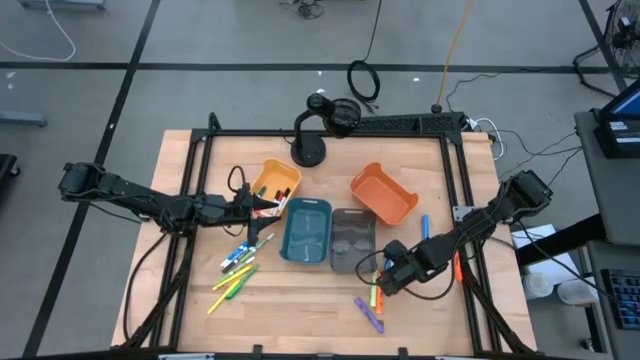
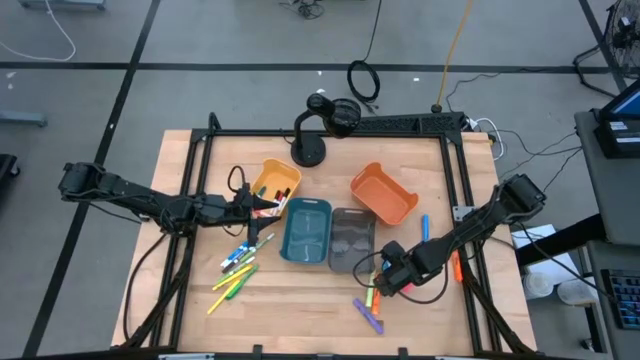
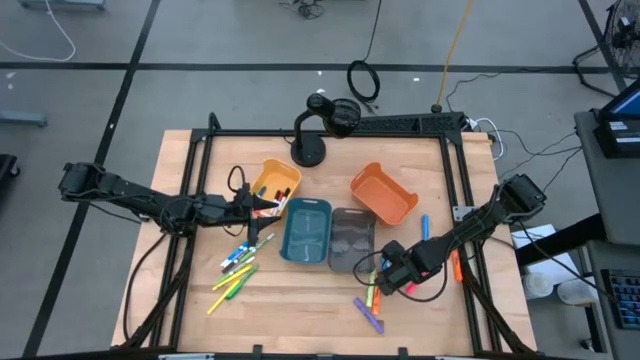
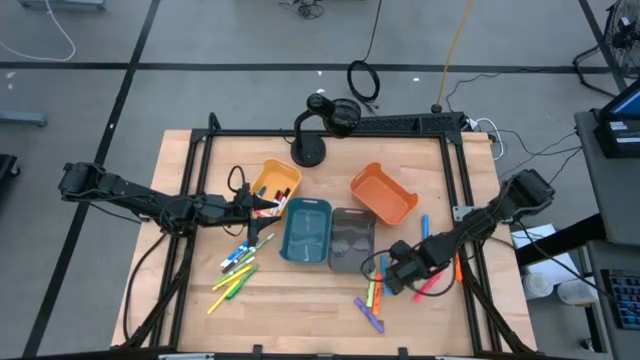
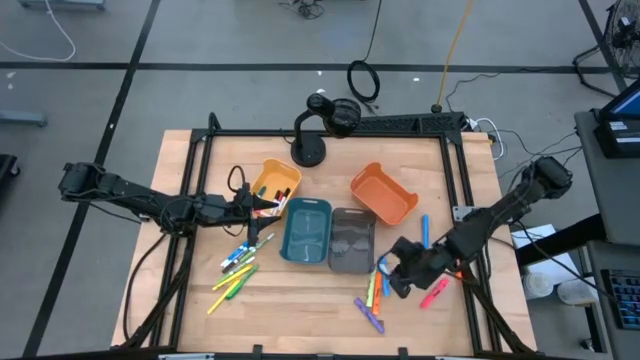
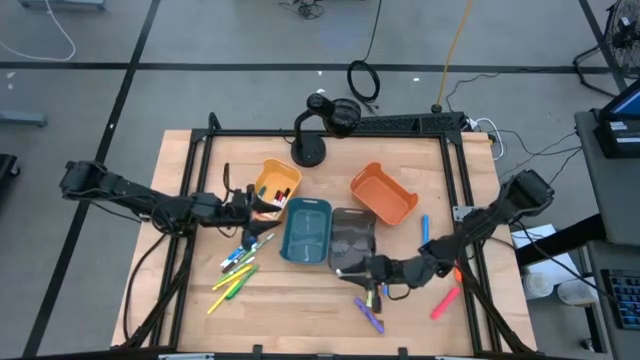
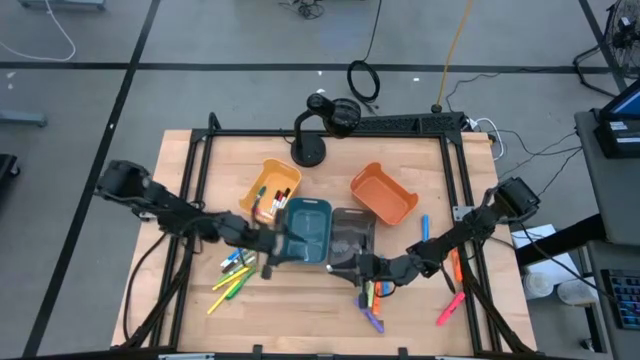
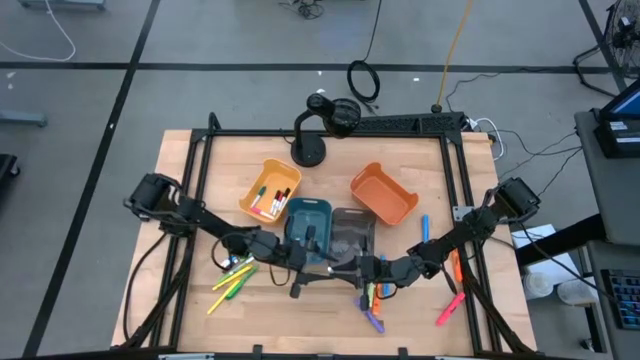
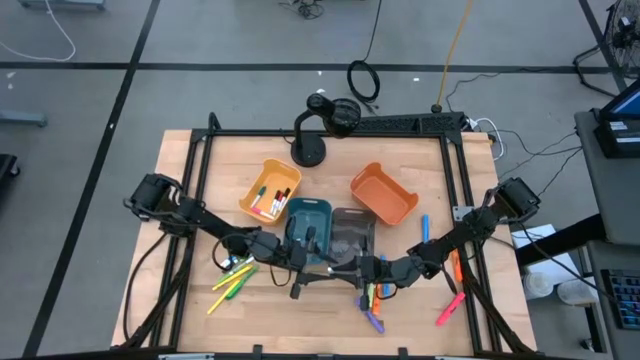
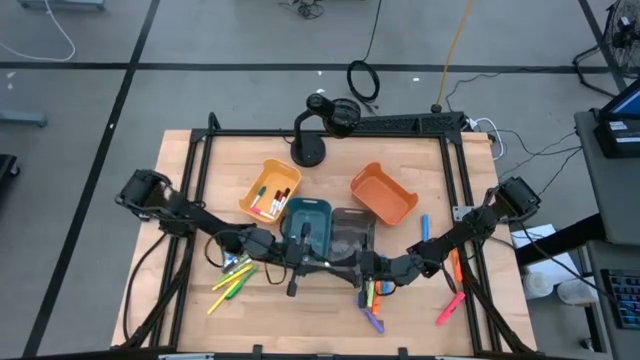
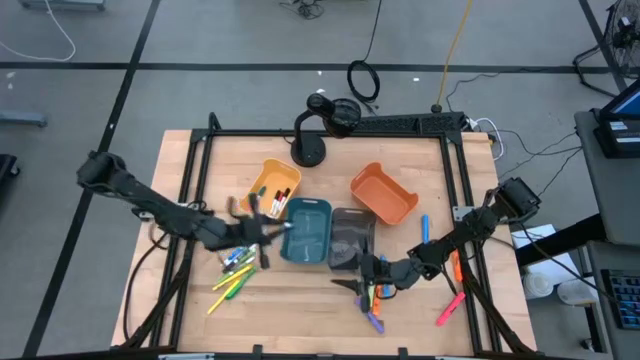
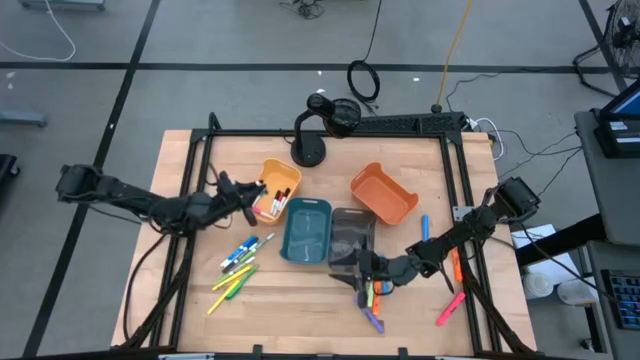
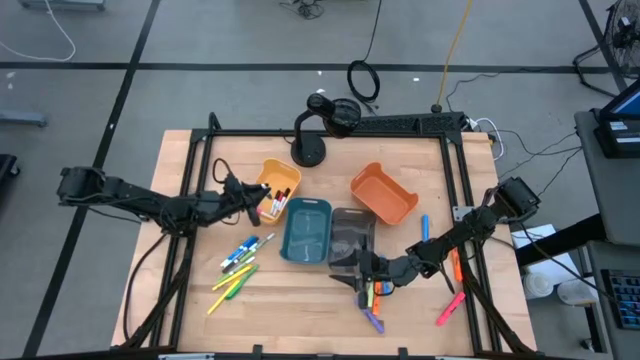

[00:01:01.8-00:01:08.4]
Task: Pick & Place Markers
Put the white and green highlighter into the yellow bin

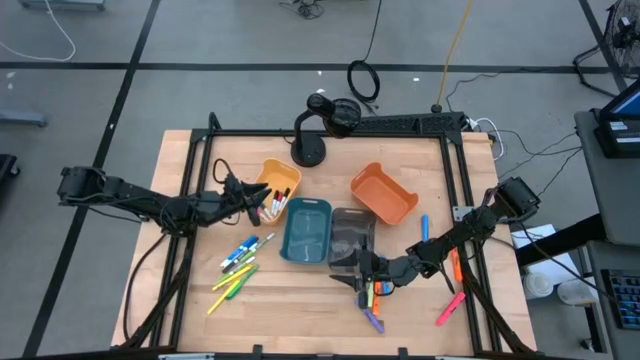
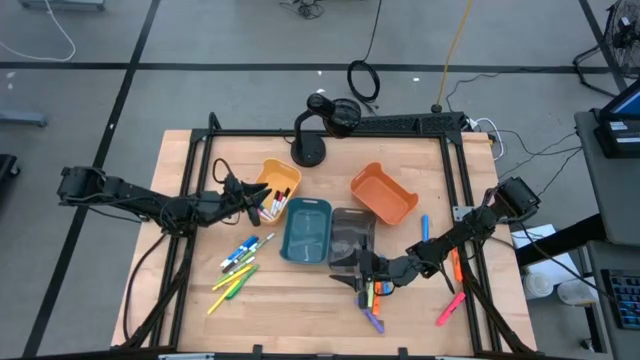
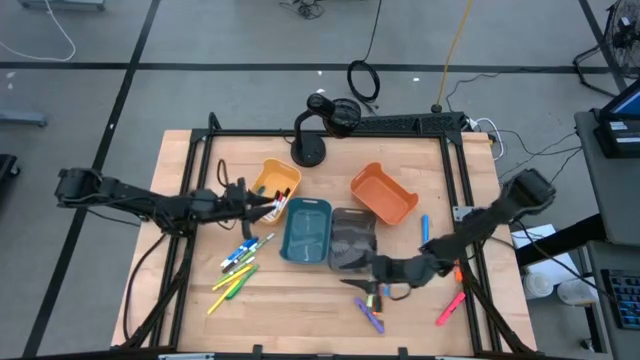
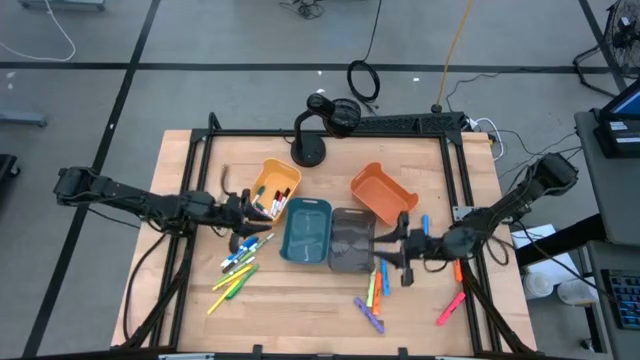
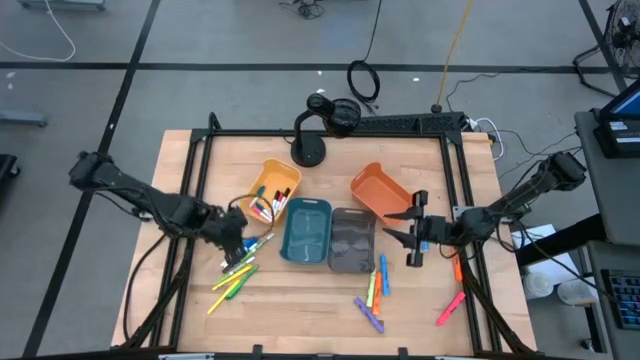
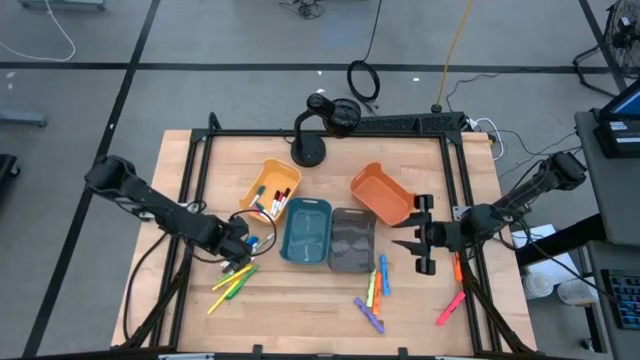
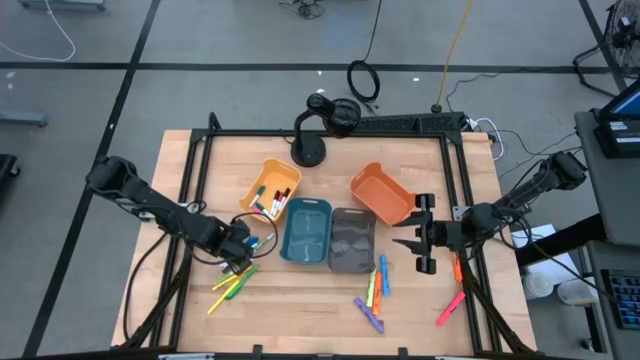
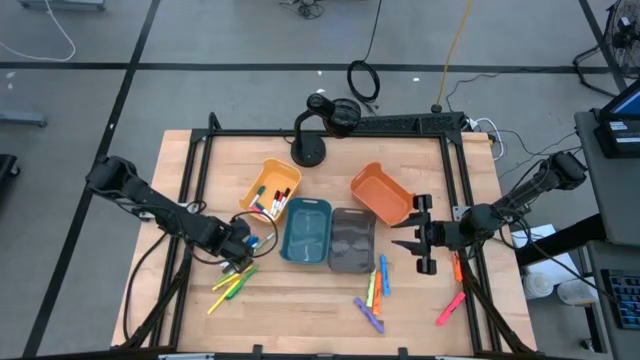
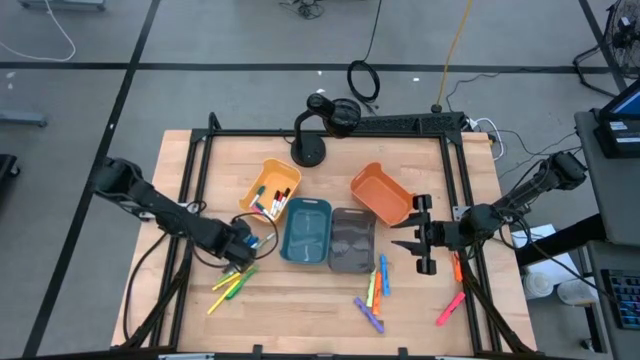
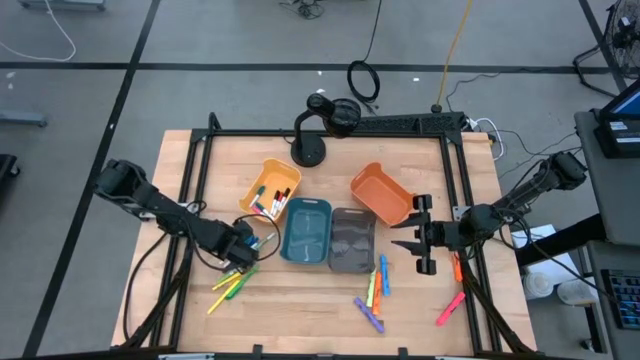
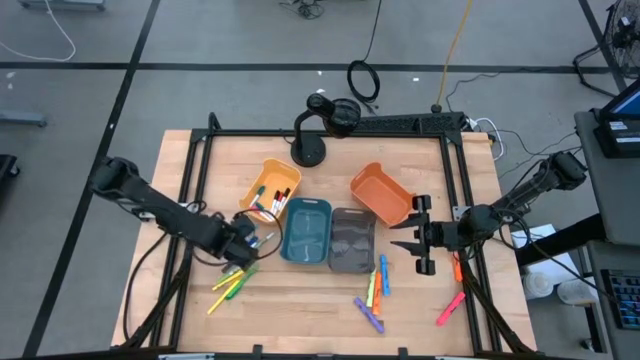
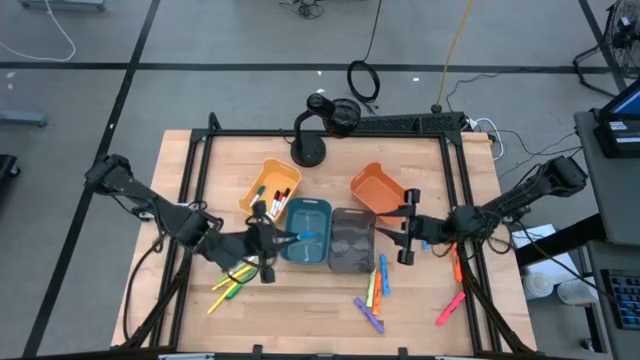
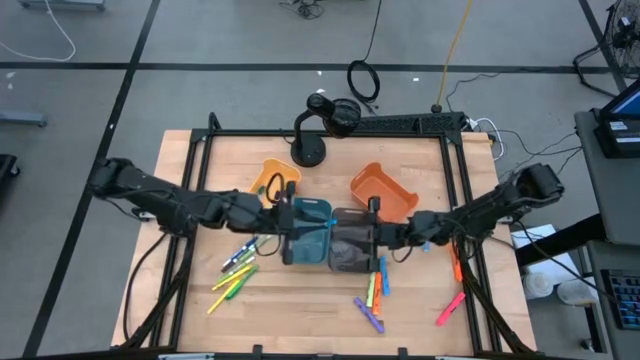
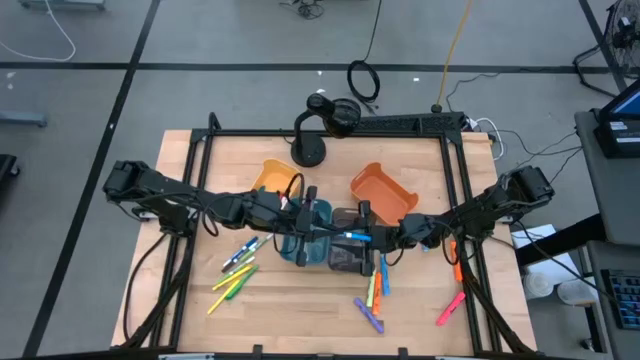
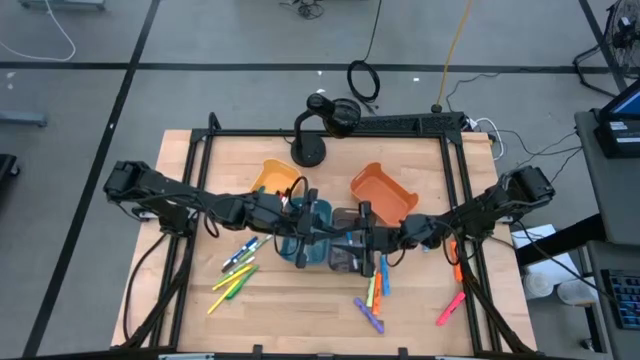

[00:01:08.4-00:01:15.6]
Put the light blue marker into the black bin

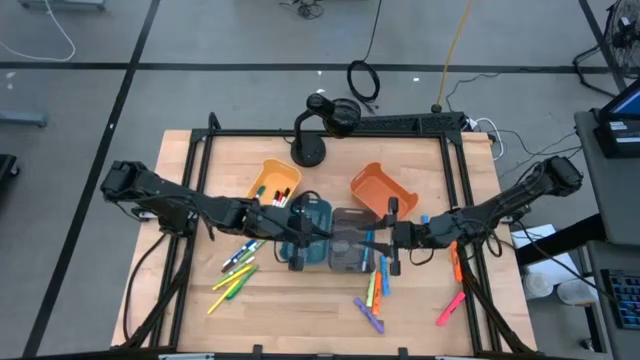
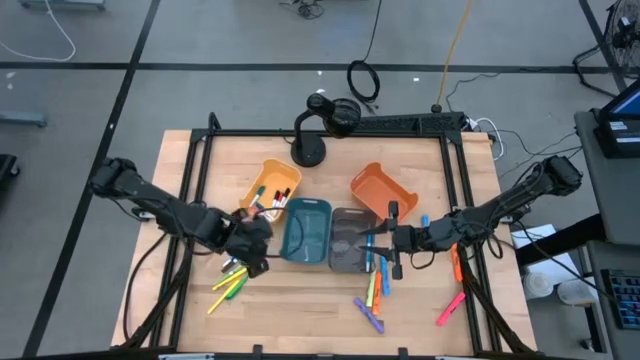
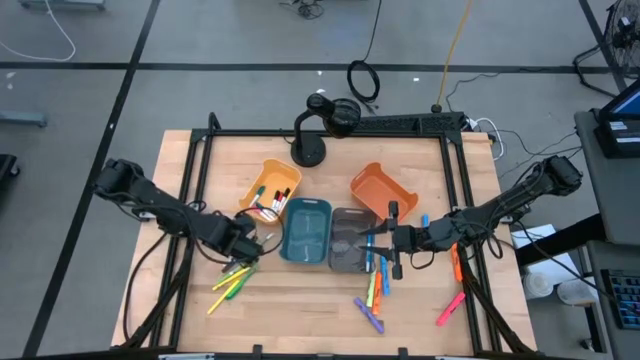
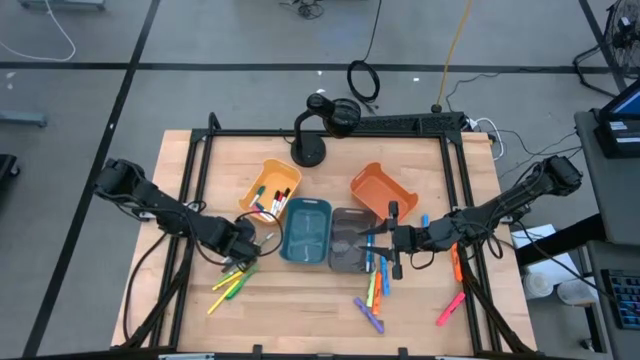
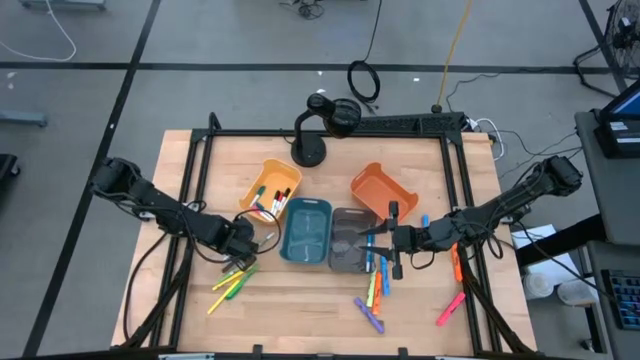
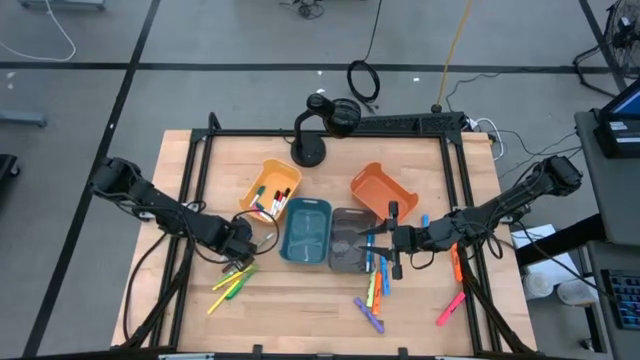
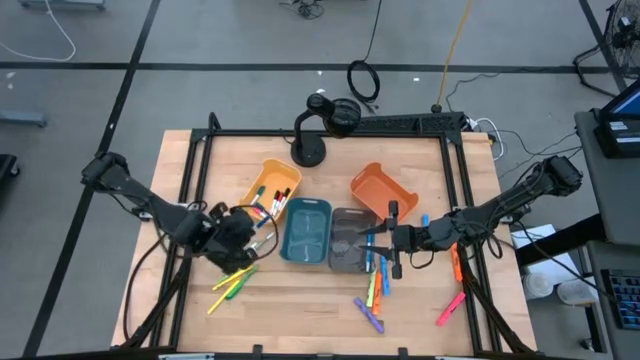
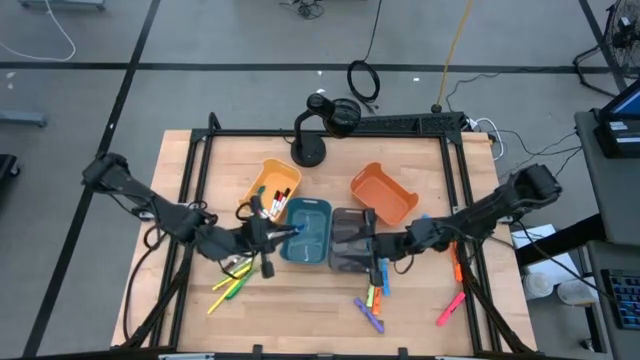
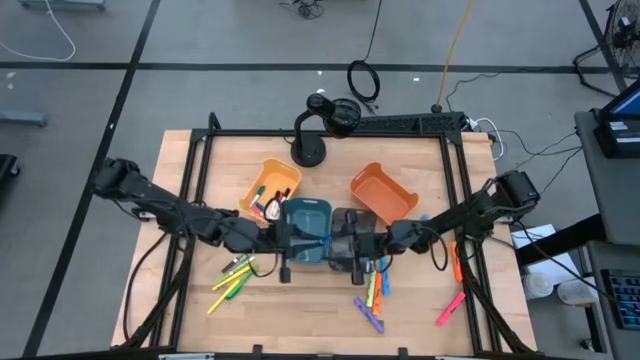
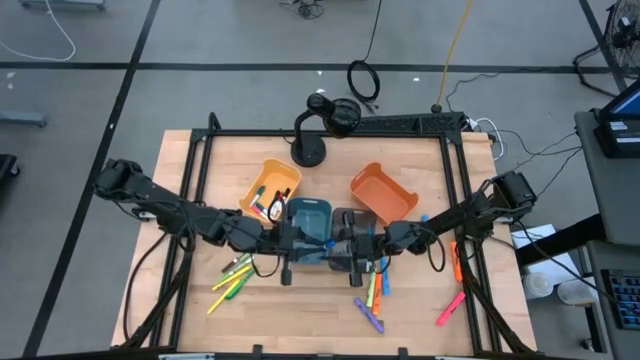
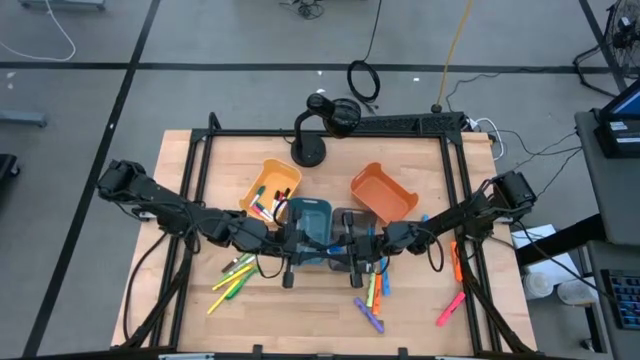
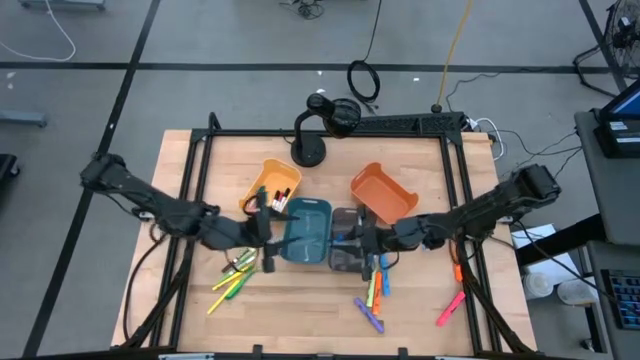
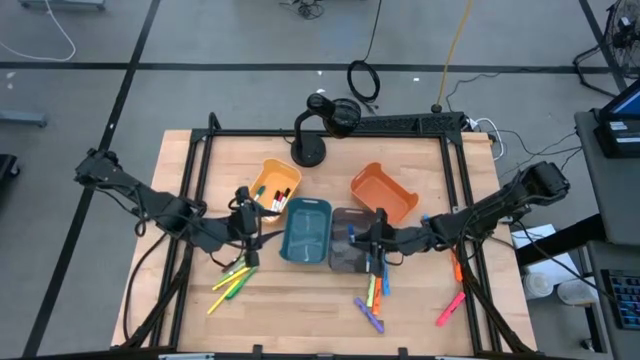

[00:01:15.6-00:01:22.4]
Put the blue marker into the black bin
